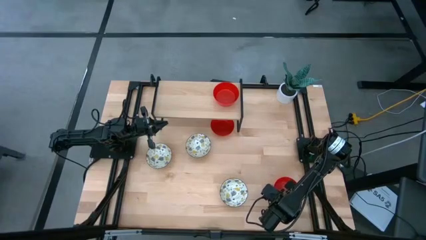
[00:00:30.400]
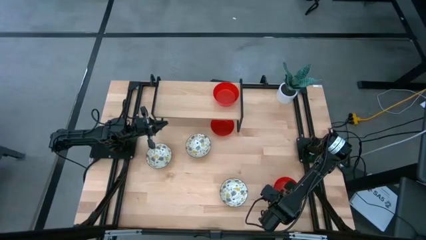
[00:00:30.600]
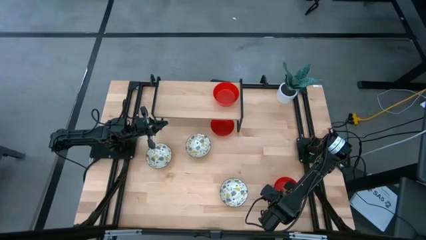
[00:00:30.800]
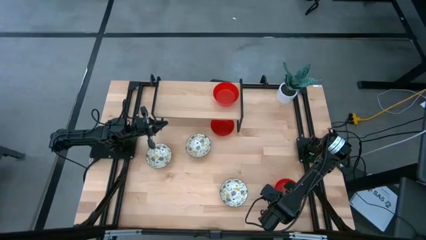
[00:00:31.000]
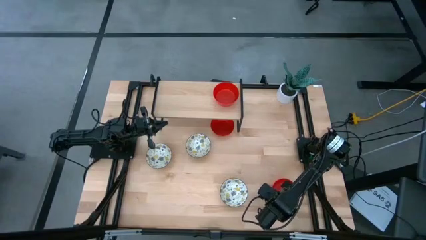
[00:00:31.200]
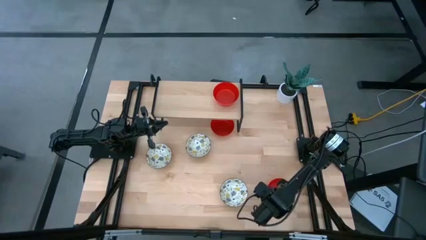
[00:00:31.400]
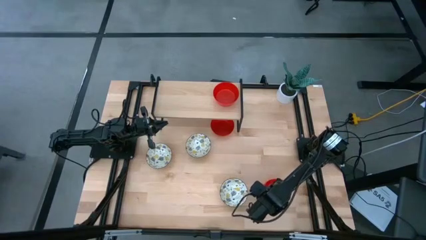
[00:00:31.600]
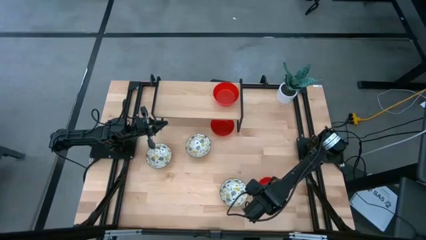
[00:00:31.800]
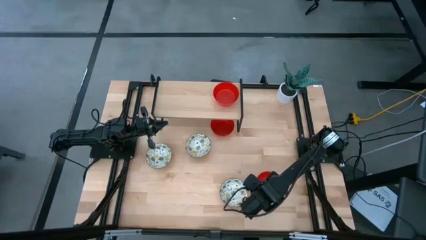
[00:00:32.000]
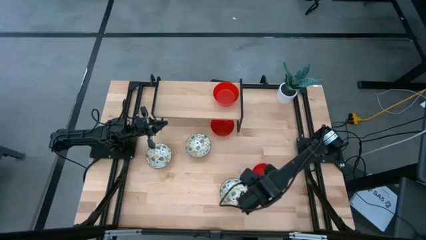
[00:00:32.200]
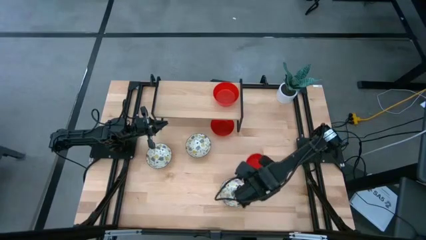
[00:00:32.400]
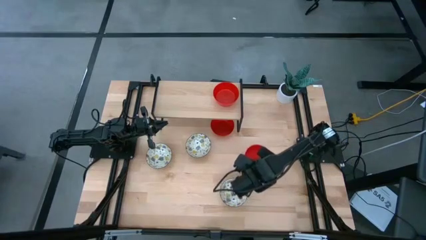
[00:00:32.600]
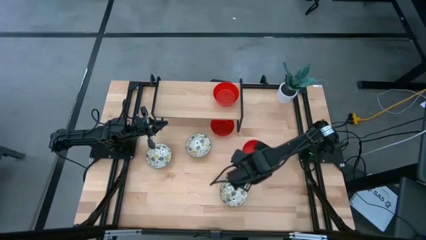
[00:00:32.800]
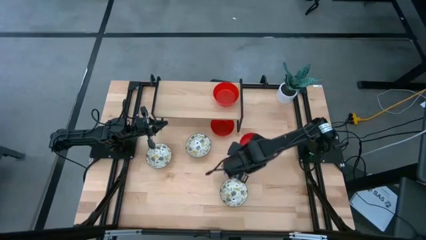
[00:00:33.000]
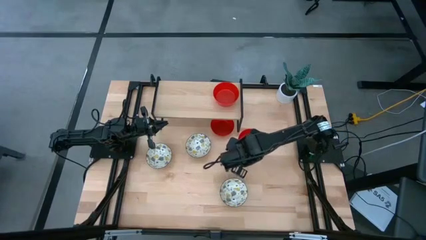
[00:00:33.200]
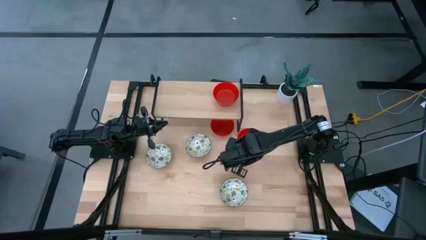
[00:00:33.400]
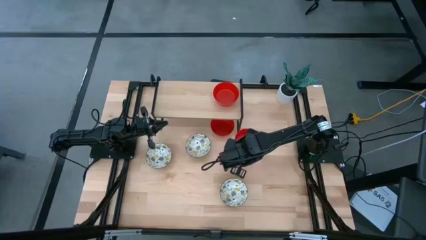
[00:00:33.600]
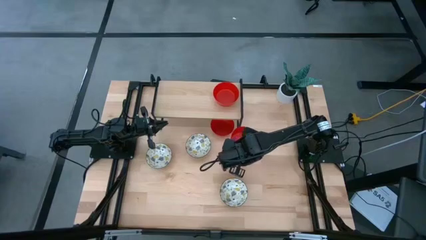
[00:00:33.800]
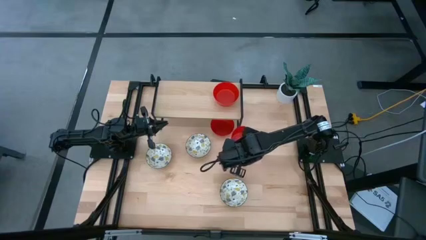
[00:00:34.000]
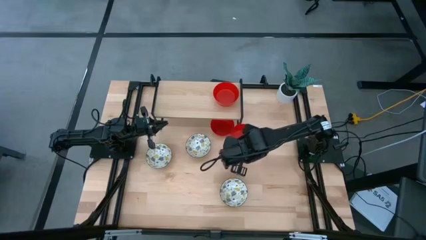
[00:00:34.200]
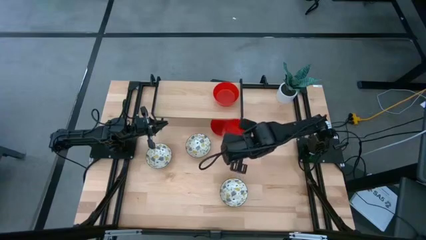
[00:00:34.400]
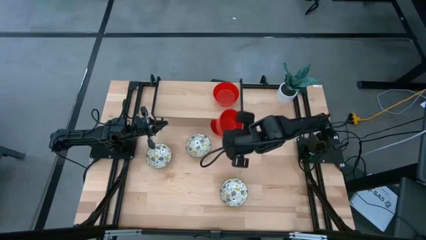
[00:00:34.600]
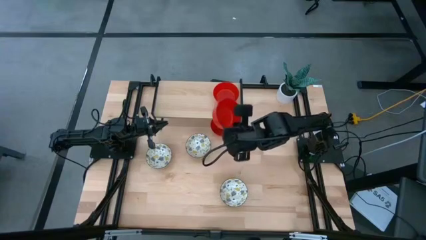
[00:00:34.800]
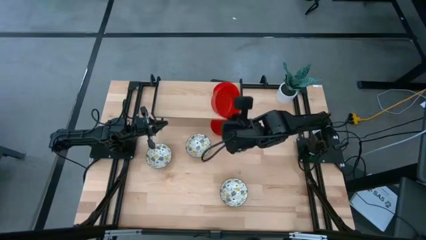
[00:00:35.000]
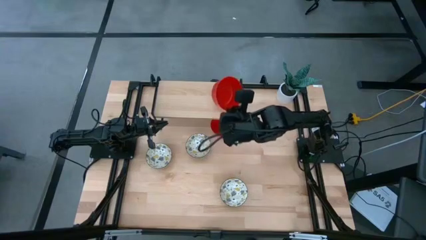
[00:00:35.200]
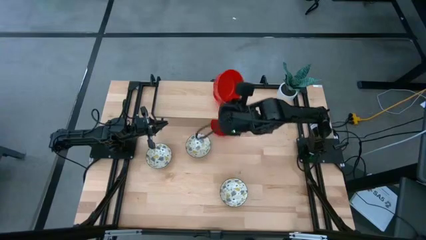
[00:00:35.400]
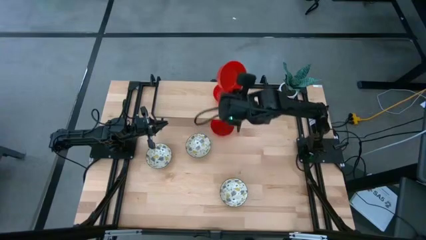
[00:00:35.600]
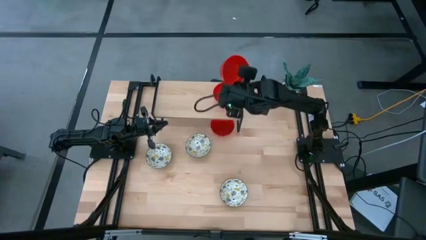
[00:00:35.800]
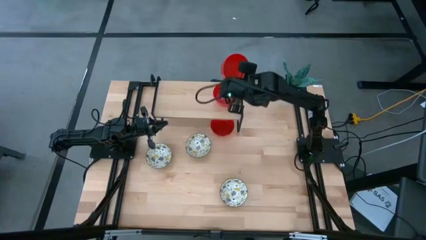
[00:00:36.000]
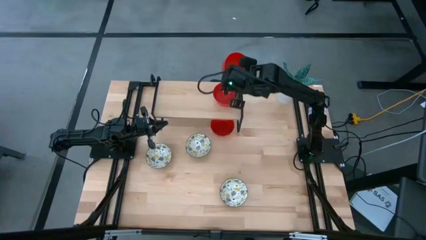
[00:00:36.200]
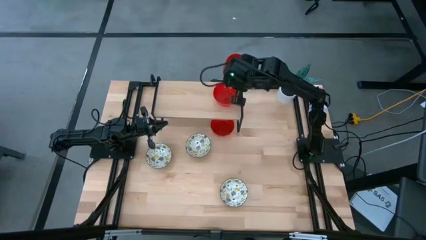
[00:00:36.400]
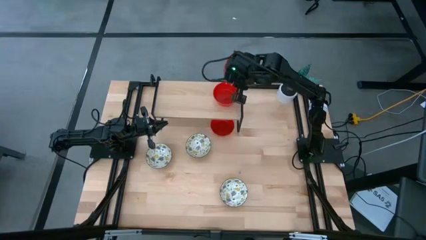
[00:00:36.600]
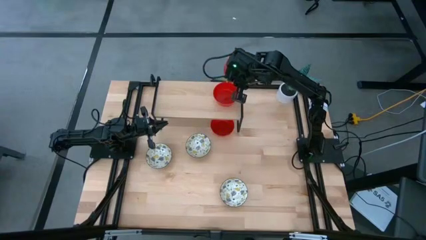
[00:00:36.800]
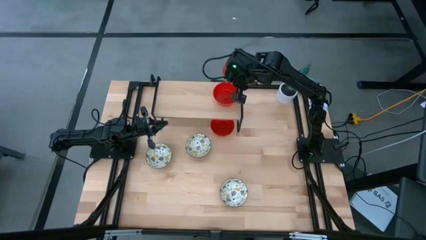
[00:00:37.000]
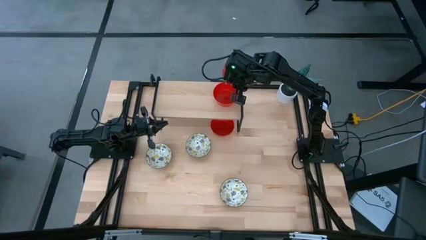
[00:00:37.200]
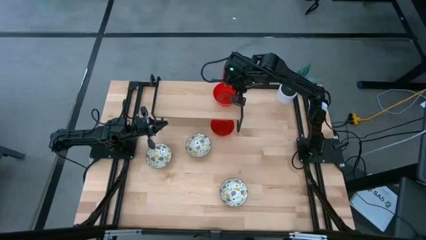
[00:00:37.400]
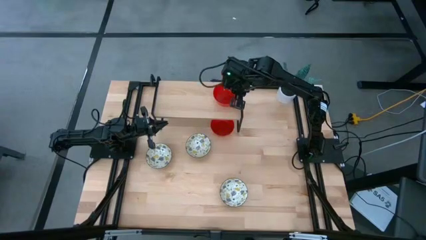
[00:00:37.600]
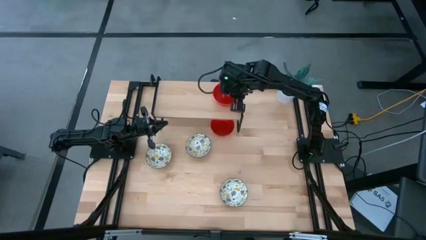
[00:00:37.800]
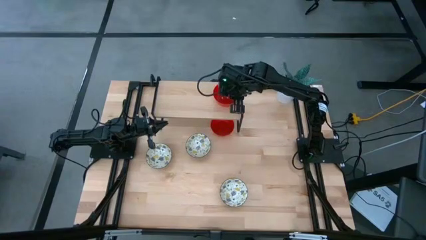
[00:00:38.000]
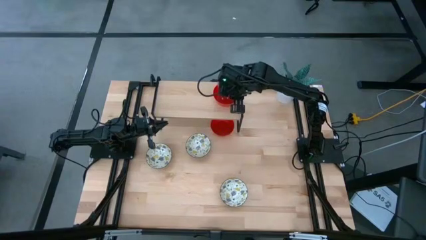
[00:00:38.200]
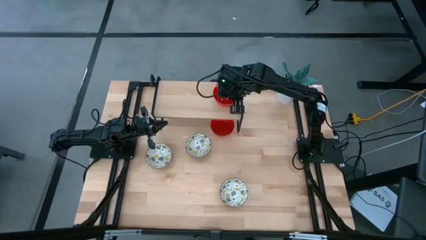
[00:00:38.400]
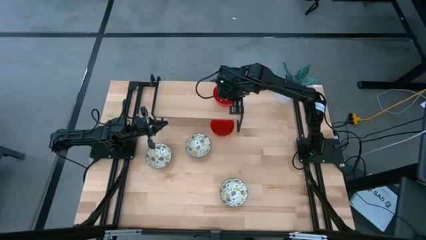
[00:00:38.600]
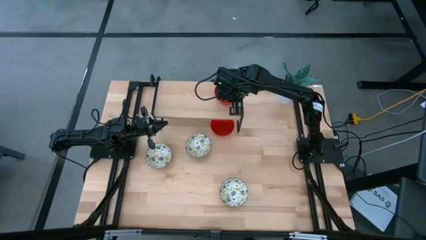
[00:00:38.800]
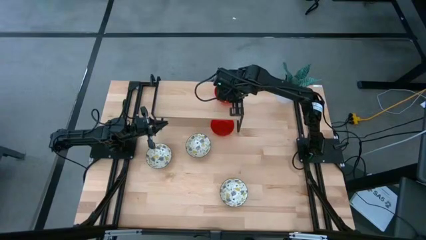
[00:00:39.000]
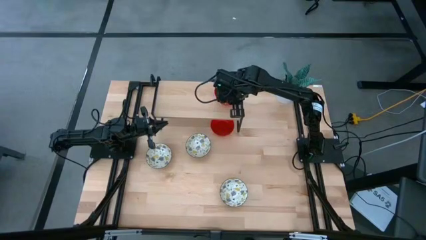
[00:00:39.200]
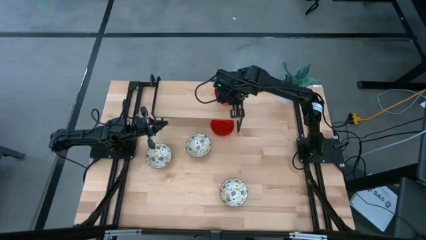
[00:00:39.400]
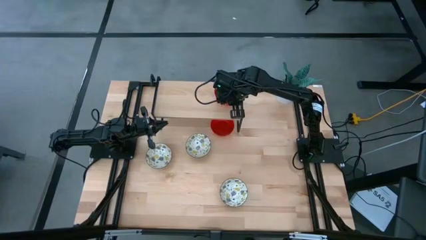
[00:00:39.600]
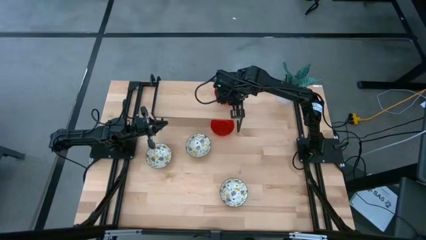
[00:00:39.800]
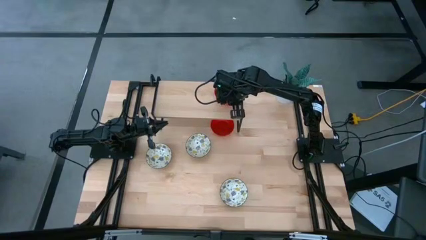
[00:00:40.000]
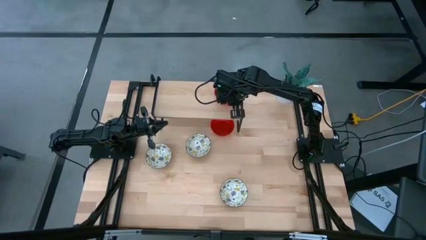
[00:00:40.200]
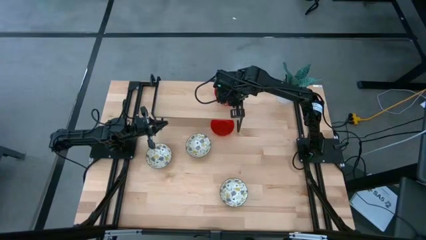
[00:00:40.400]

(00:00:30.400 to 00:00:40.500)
Task: Pick & Place Mini bowls
Stack the bottom red bowl on top of the red bowl on the shelf

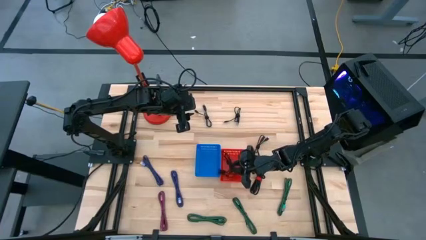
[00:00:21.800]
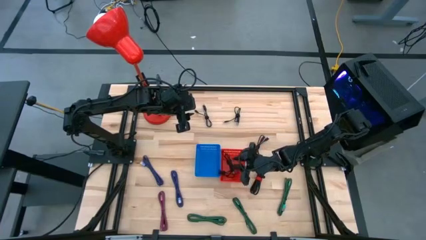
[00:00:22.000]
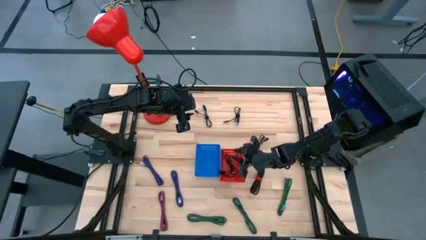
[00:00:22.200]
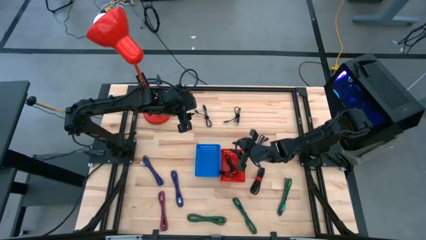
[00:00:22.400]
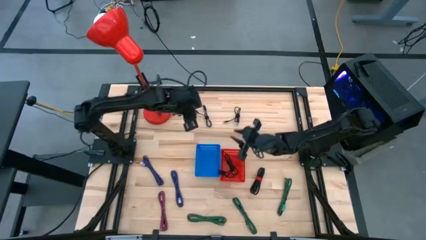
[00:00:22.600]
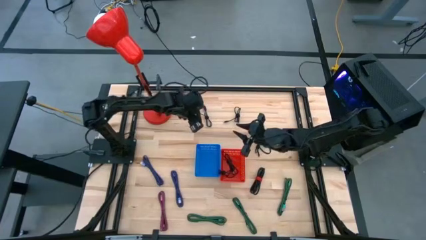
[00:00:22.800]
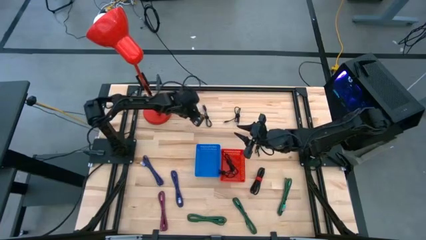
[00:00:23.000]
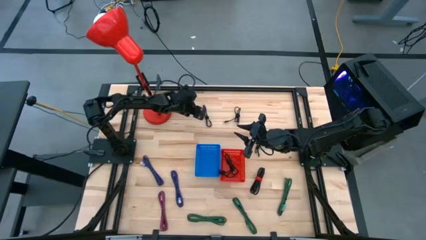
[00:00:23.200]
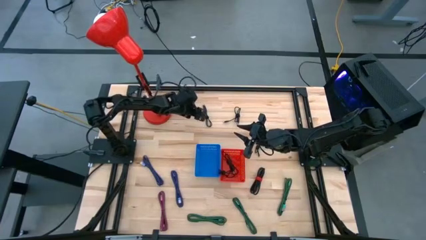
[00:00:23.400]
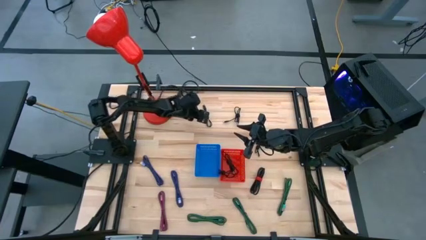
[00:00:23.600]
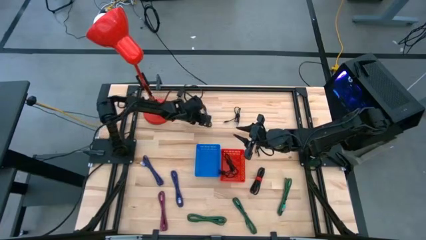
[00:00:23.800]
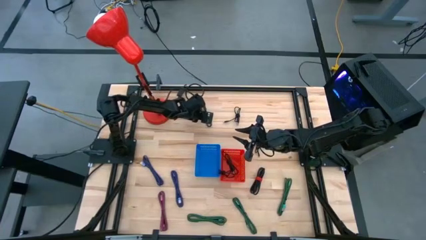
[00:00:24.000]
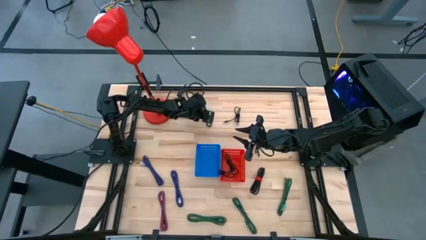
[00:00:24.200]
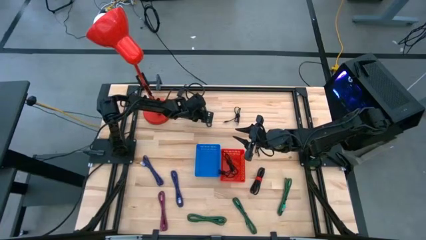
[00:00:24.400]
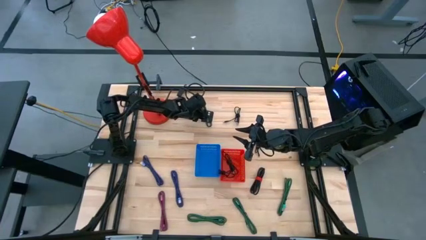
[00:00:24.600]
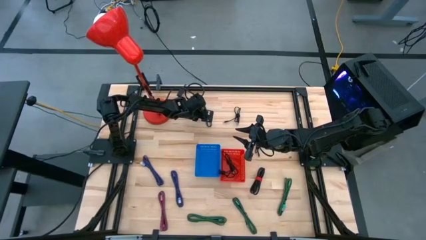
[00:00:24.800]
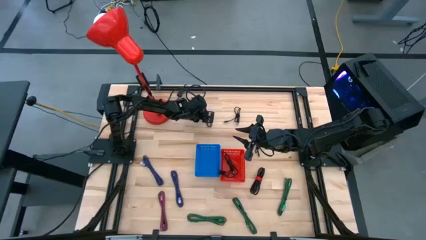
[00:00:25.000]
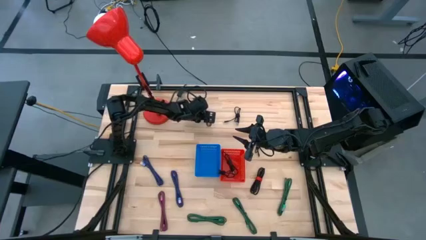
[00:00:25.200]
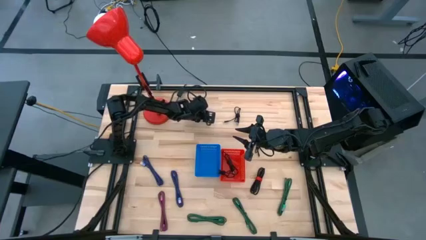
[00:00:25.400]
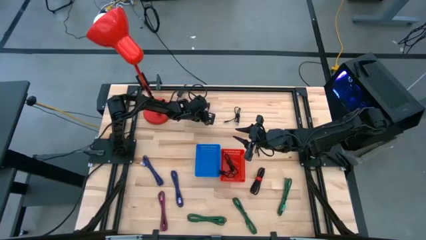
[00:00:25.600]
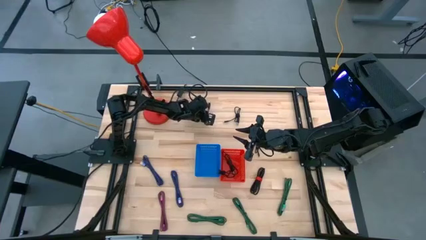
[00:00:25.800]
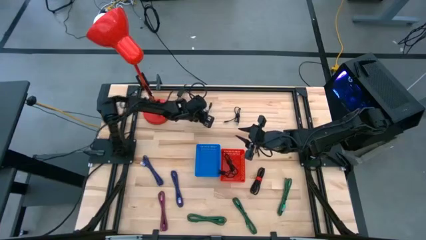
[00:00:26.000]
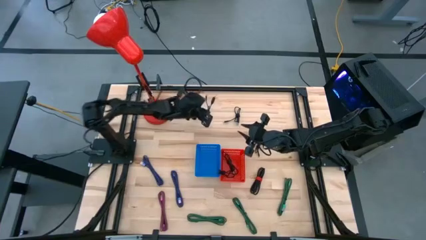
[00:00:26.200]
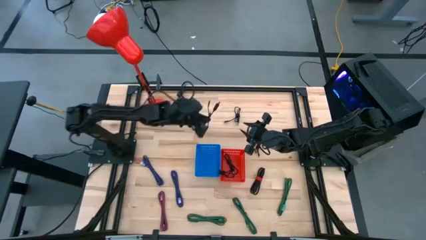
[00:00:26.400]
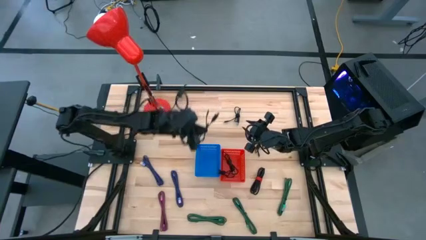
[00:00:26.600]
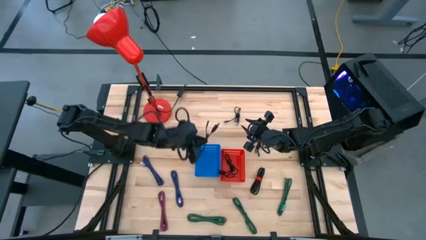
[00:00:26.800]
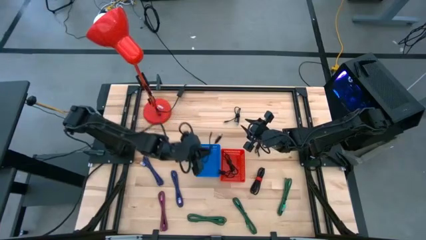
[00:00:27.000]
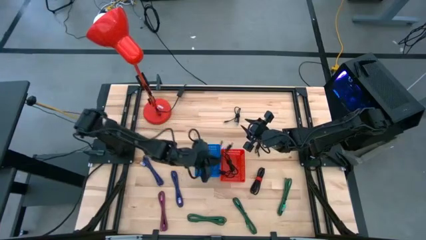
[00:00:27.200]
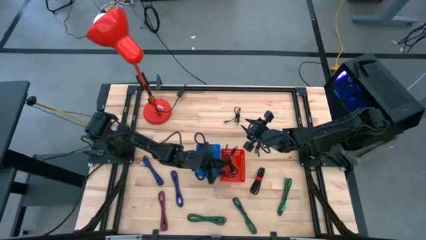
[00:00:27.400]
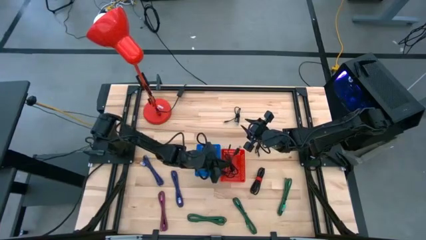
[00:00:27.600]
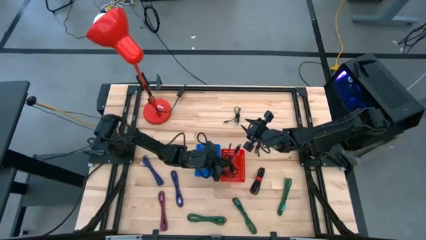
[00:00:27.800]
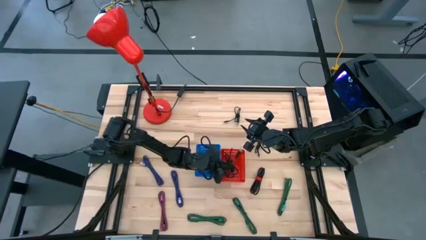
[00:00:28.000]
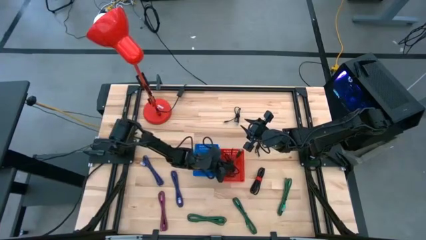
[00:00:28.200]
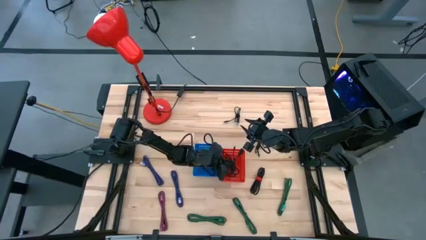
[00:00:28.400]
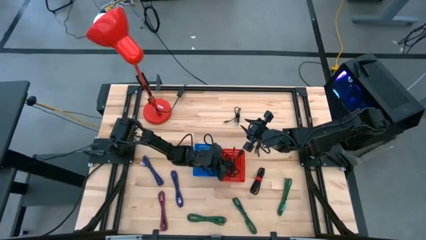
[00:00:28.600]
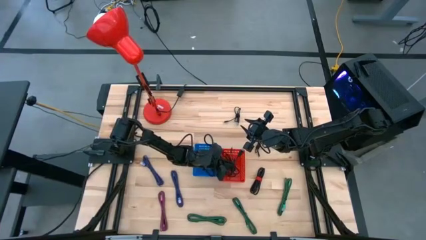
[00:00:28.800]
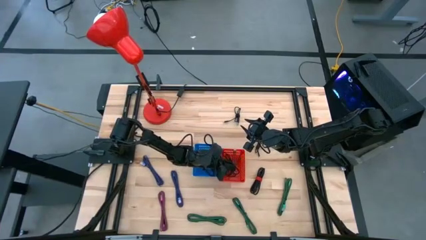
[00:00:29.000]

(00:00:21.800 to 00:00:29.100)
Task: Pick & Place USB Port
Put the black charger cable into the red bin
